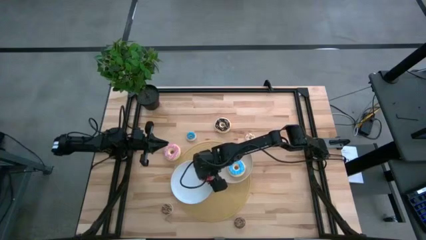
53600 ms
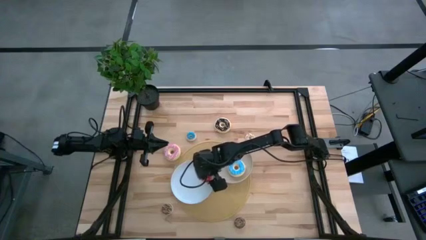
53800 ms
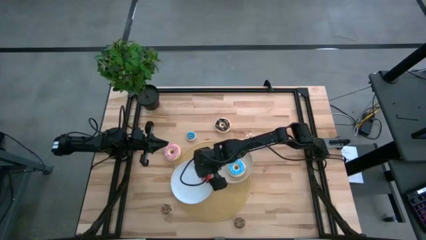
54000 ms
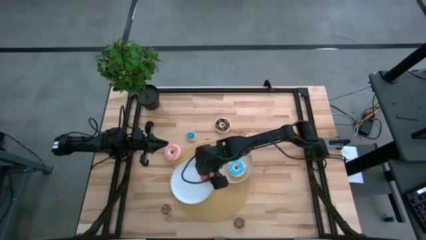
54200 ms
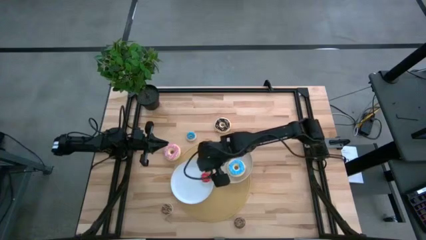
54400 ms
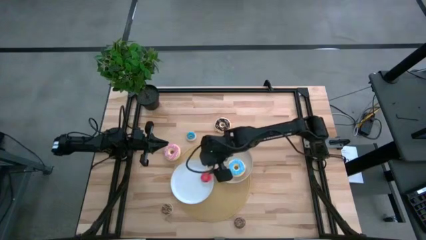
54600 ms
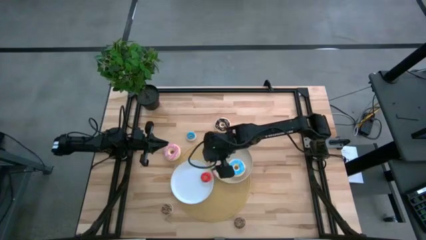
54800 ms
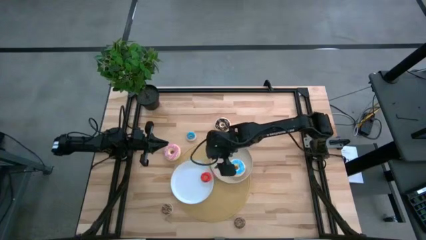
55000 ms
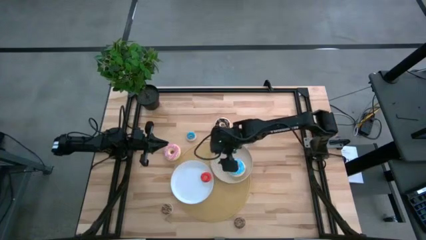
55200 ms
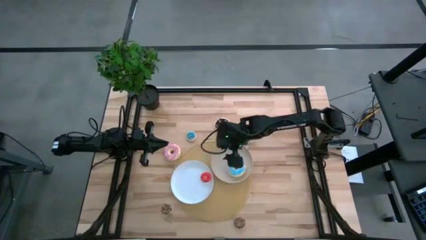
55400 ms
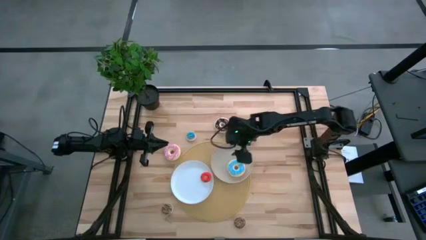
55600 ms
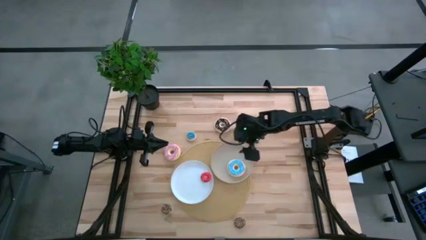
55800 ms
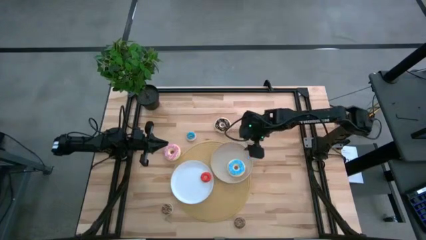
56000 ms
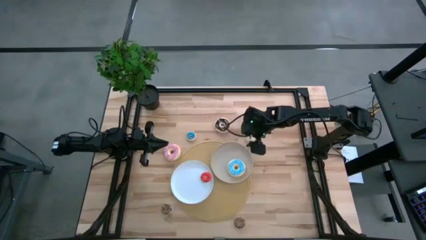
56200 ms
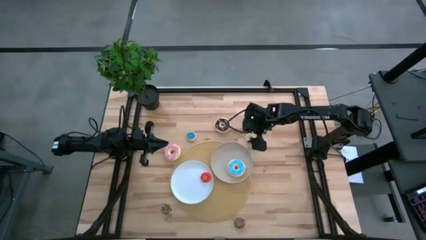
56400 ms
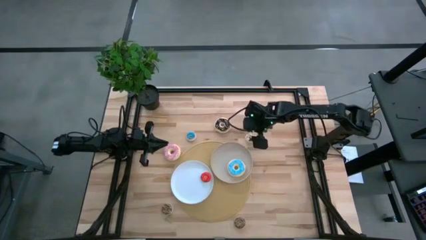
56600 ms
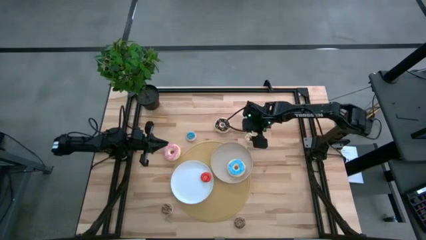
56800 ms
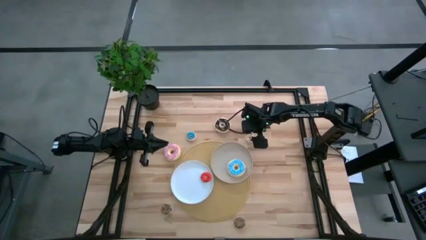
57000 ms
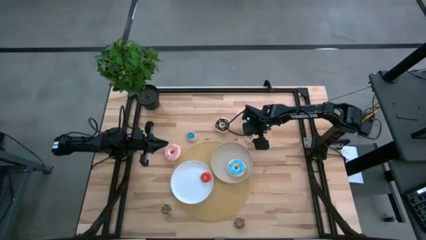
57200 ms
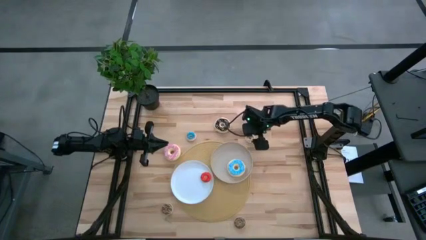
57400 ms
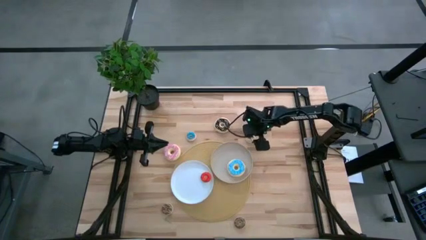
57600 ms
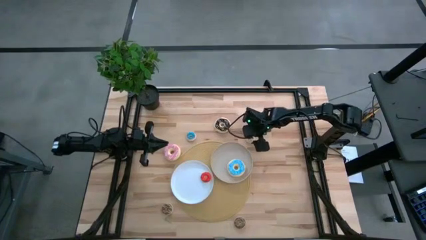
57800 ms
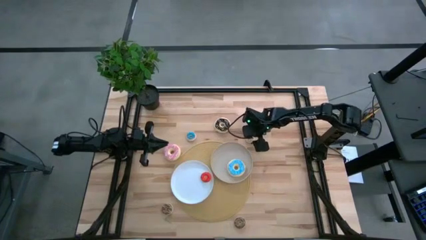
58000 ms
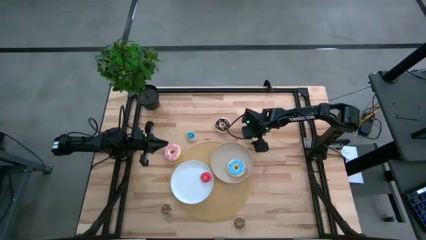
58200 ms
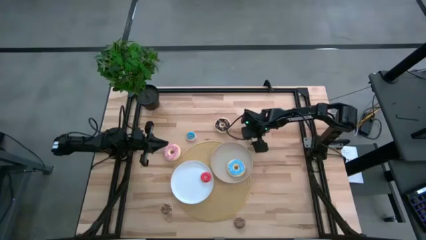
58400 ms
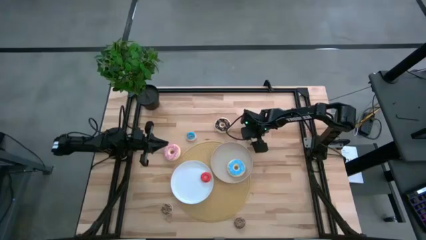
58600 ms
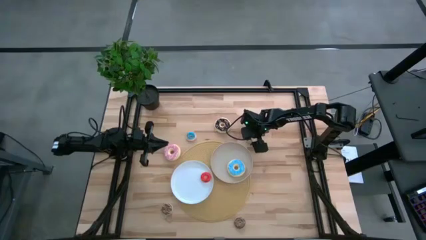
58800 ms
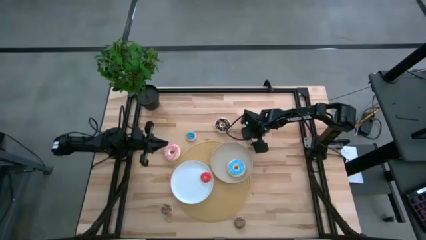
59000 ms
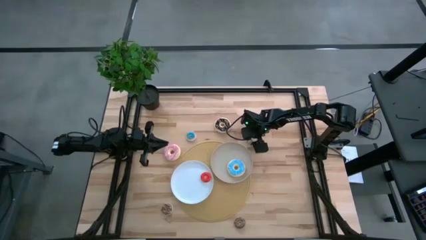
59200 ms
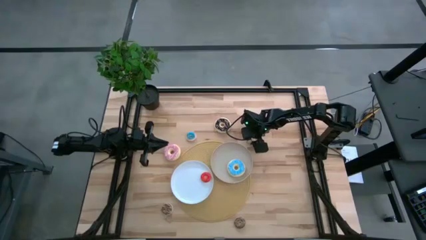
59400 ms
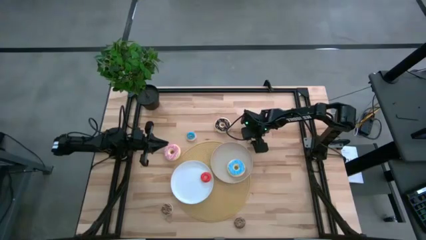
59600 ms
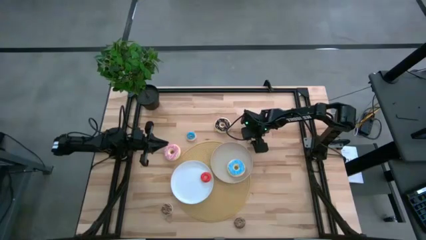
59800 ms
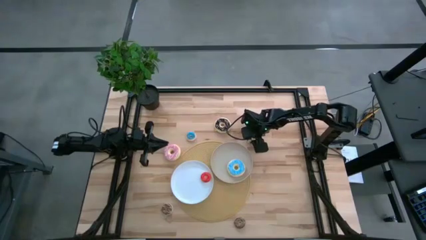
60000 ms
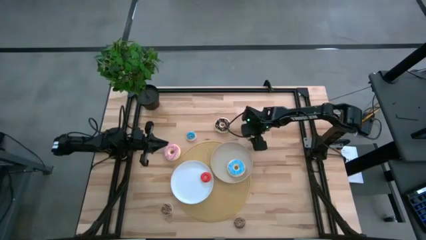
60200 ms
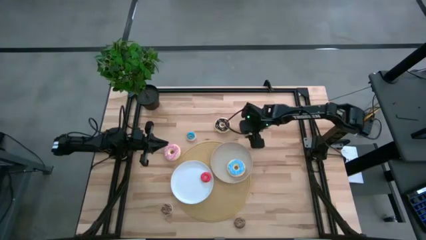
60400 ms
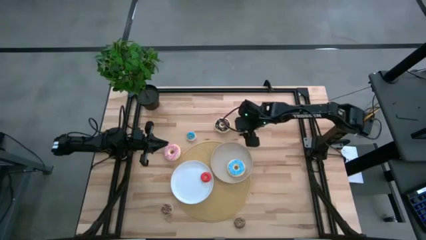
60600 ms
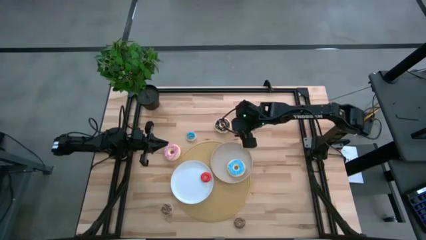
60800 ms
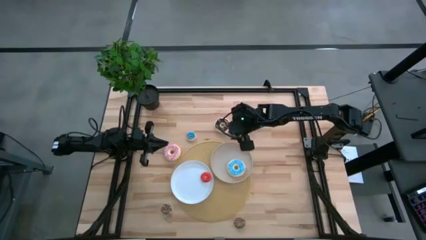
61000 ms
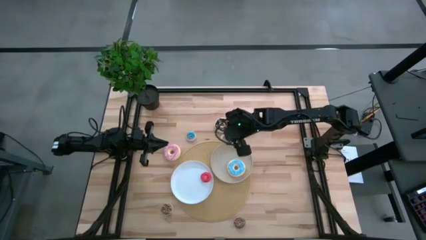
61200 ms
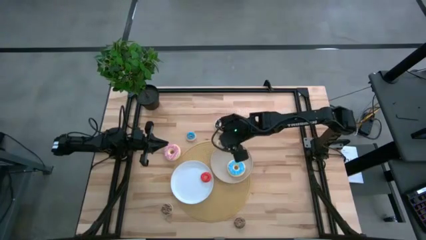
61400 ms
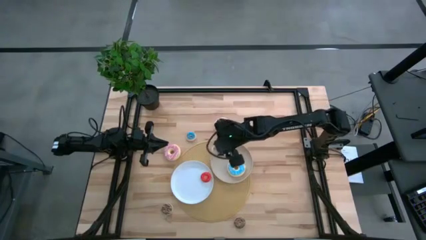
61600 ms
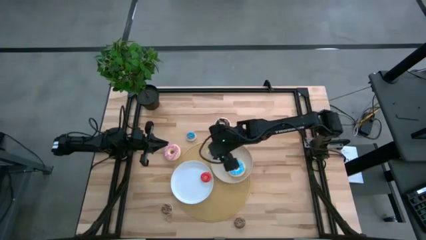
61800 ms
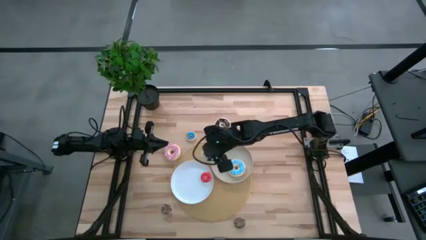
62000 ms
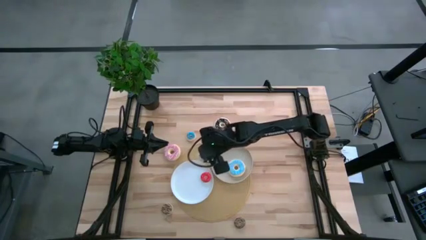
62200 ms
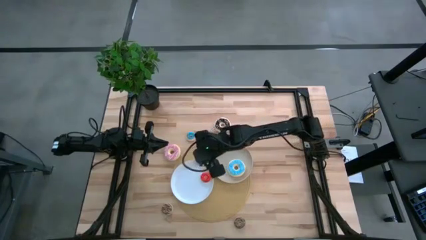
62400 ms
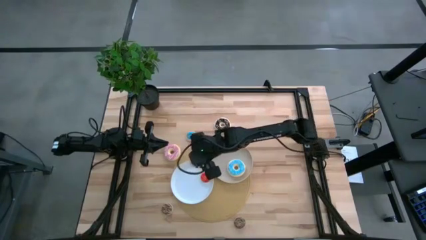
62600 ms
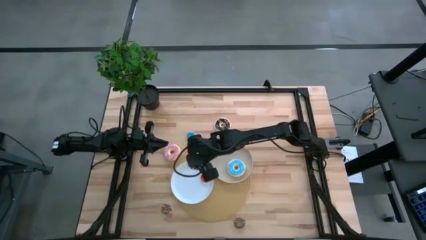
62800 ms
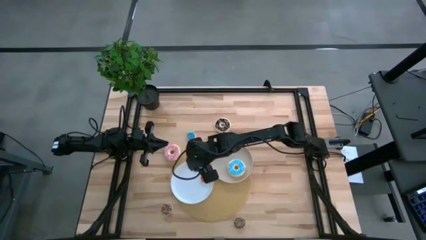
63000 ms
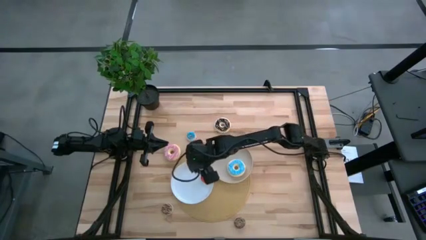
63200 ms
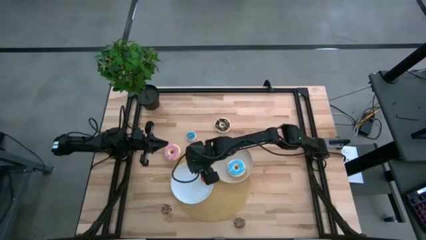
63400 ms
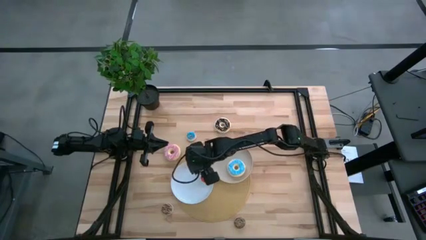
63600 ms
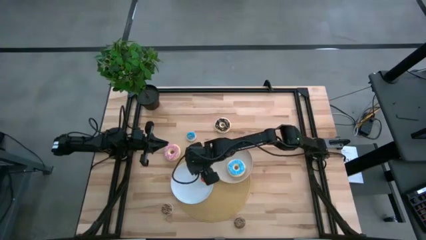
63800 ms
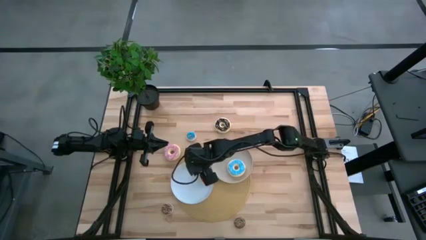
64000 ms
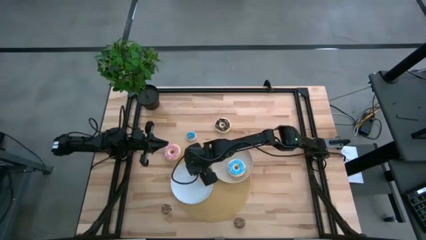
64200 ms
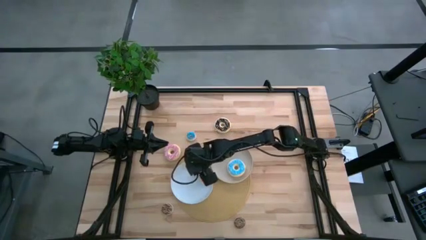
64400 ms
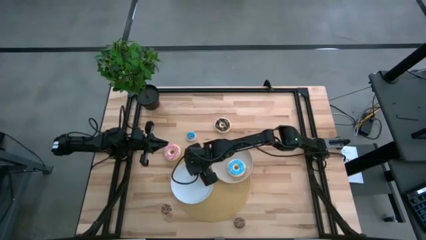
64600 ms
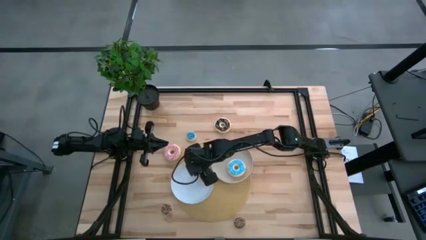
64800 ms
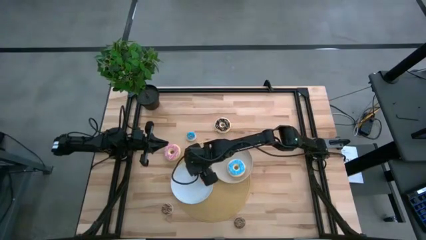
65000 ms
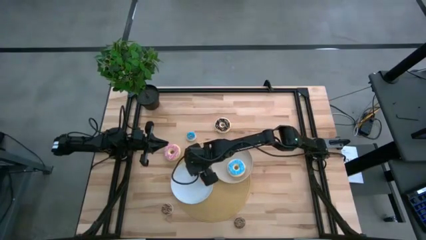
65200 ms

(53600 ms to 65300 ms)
Task: Pick & Place donuts
Put the small white donut on the white plate

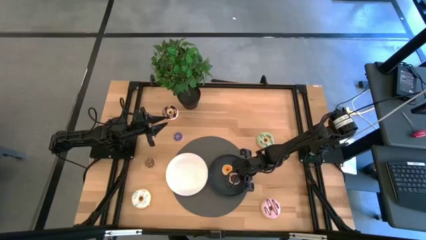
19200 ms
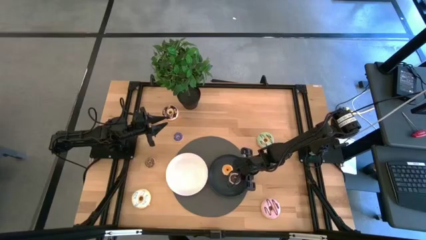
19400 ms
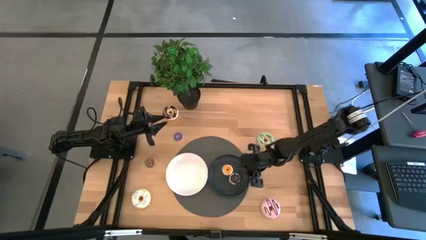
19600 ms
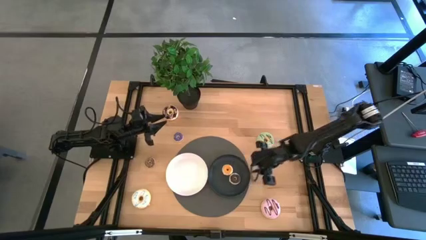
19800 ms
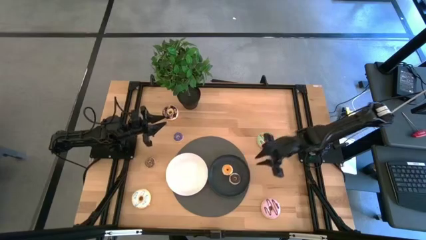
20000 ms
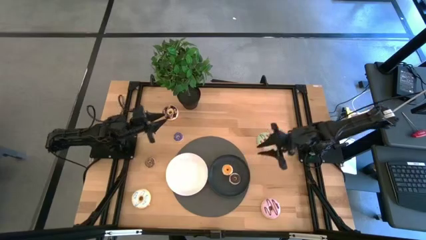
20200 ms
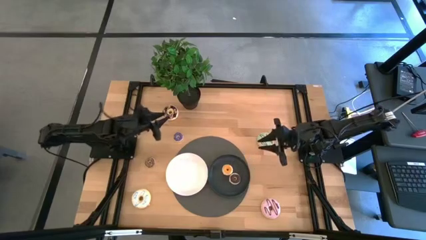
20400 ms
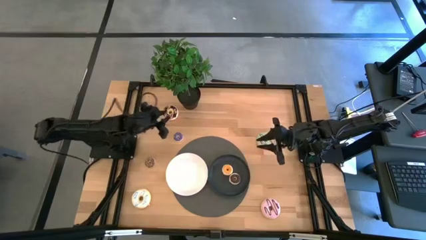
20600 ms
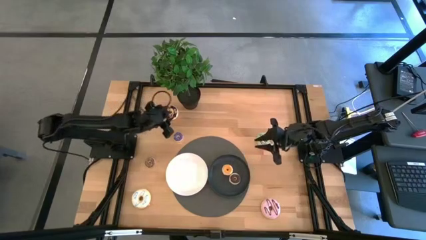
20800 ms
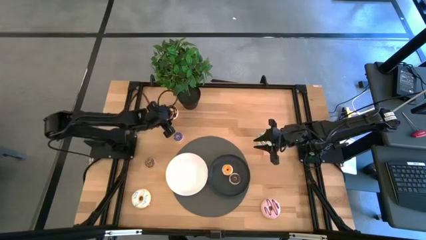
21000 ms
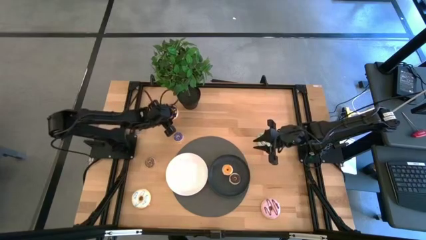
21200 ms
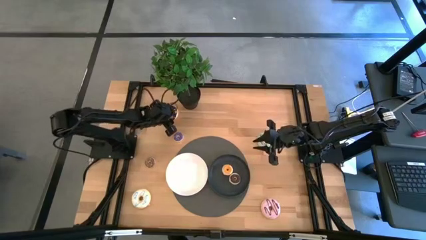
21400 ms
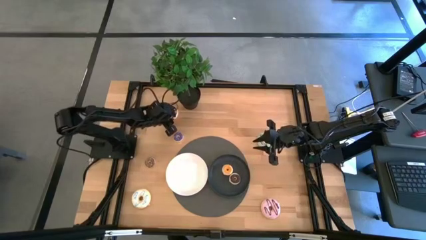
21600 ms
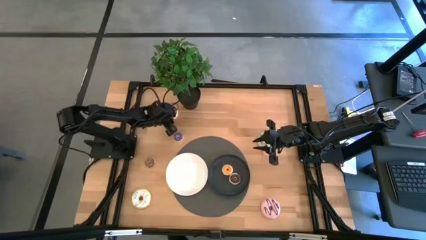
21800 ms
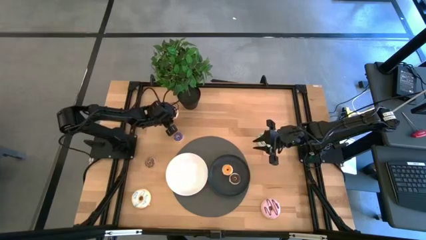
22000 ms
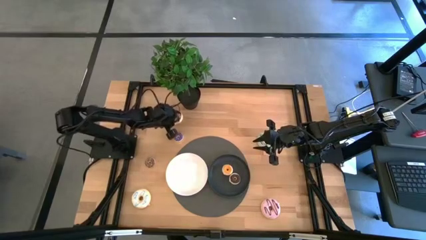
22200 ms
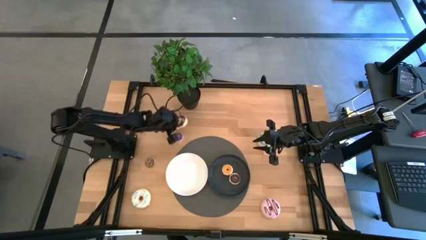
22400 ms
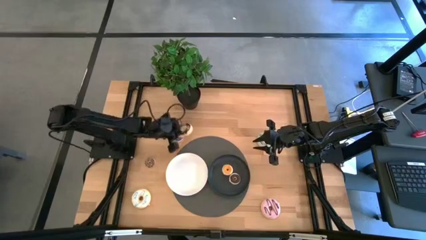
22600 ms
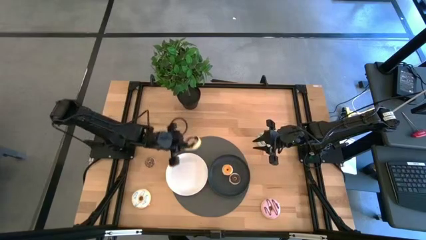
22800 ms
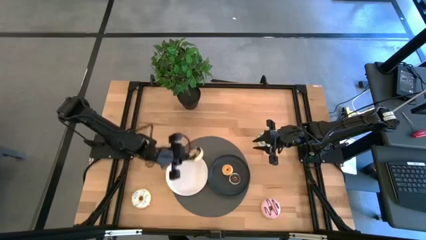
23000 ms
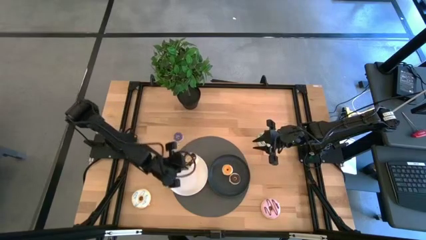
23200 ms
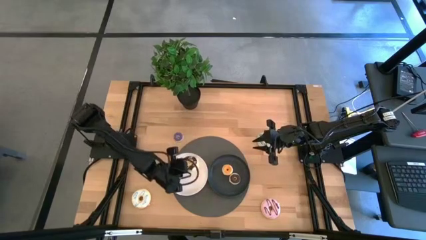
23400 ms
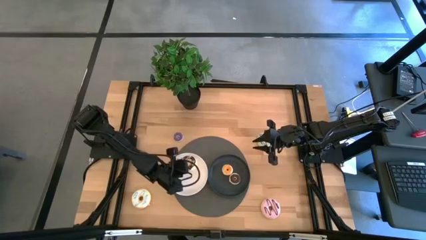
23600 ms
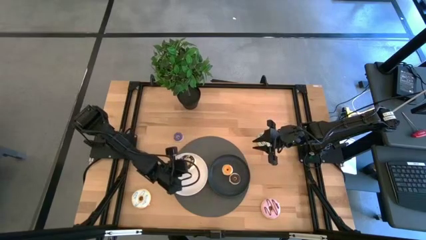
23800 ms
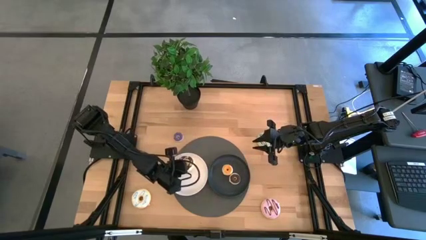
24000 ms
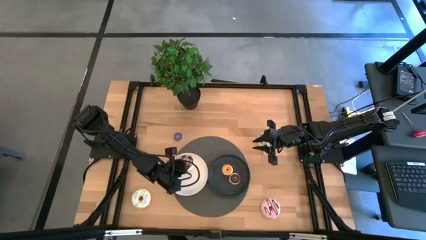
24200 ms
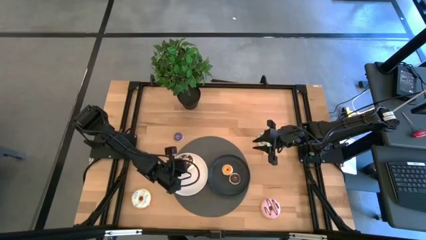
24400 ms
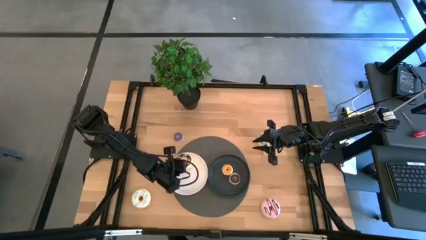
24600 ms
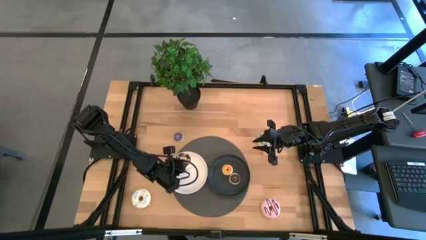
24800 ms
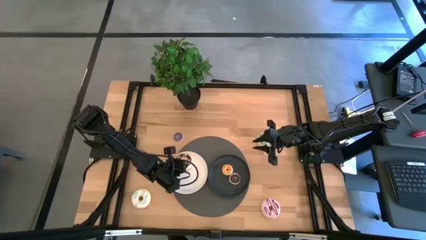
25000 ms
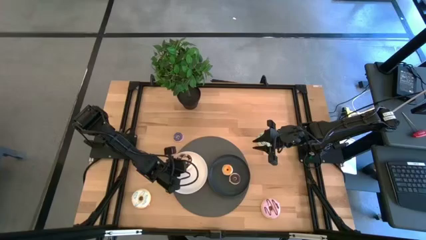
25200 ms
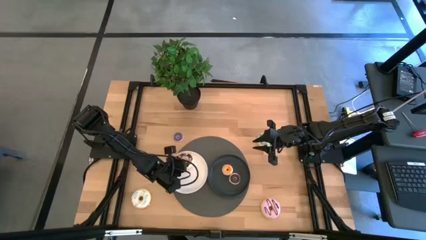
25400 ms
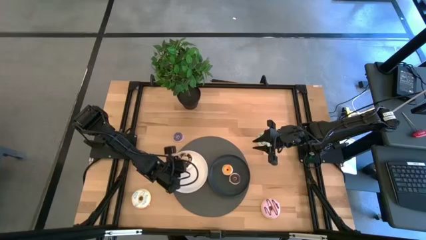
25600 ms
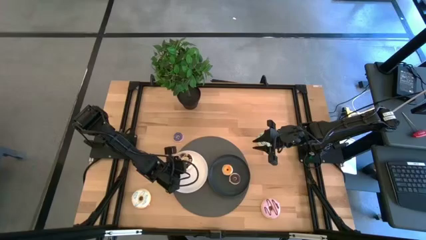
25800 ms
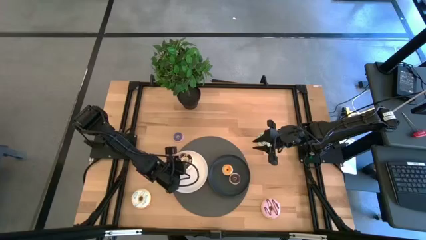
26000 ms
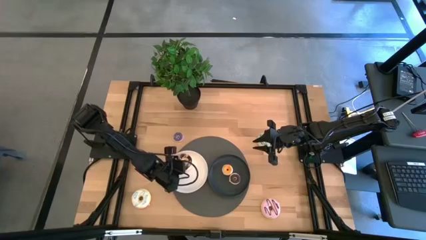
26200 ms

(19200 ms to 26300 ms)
Task: Pick & Place donuts
Put the large black donut on the white plate
